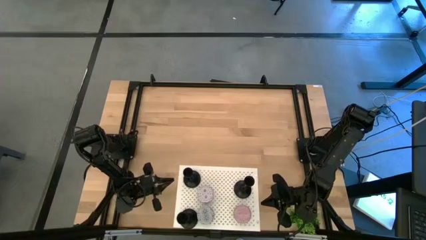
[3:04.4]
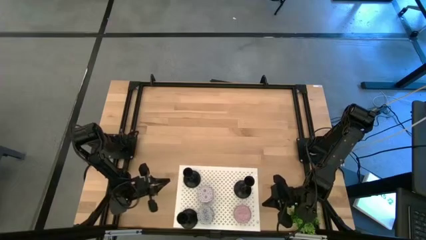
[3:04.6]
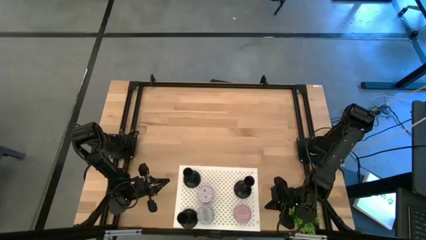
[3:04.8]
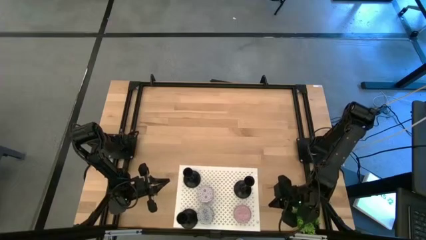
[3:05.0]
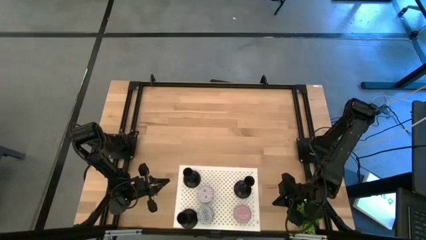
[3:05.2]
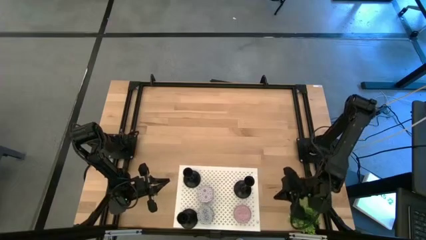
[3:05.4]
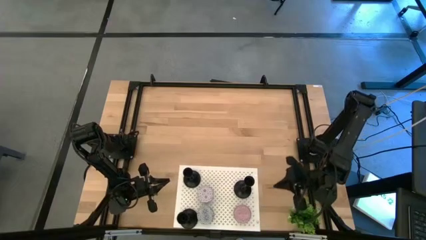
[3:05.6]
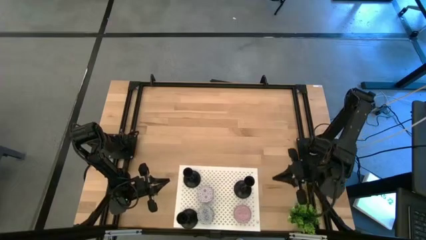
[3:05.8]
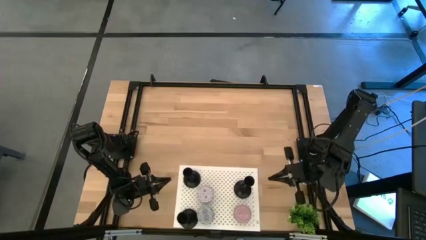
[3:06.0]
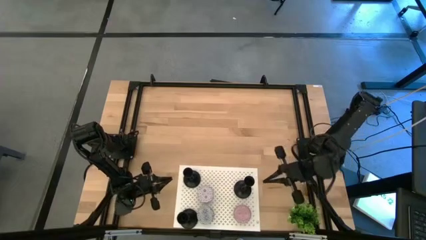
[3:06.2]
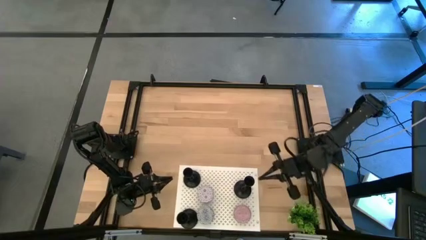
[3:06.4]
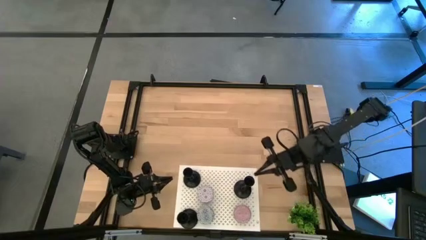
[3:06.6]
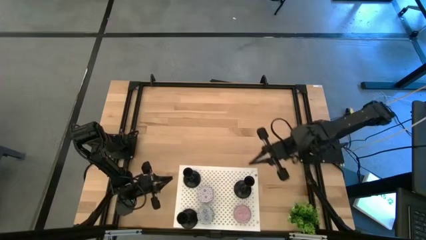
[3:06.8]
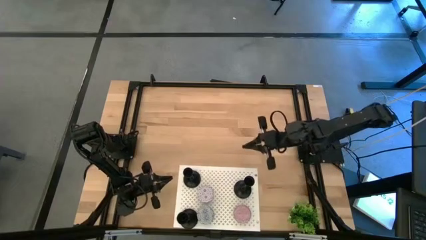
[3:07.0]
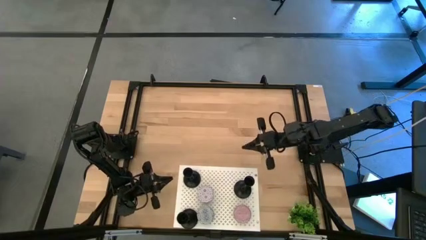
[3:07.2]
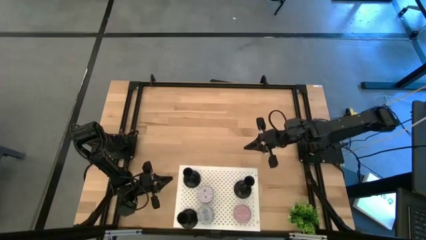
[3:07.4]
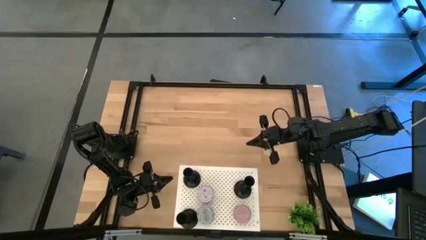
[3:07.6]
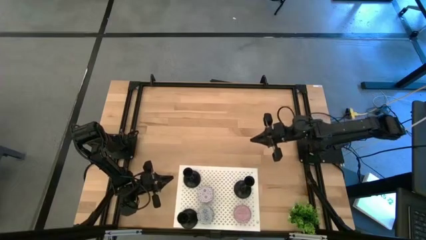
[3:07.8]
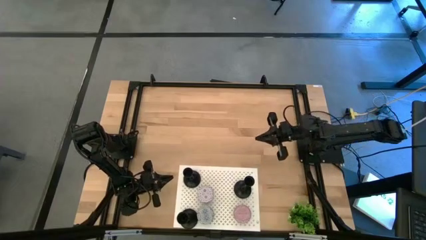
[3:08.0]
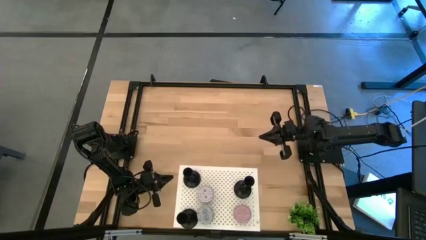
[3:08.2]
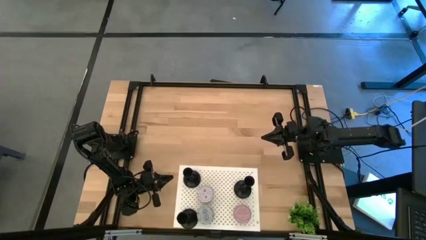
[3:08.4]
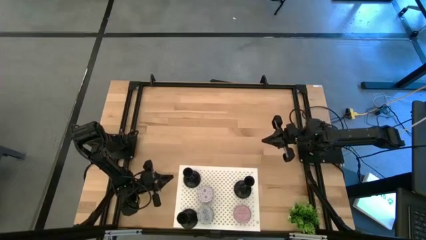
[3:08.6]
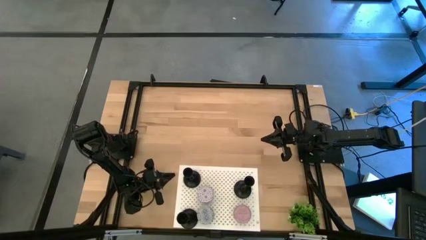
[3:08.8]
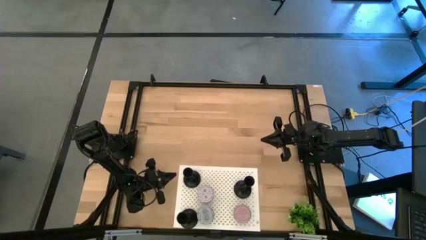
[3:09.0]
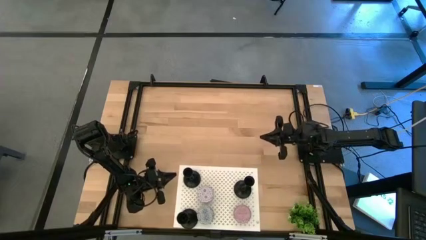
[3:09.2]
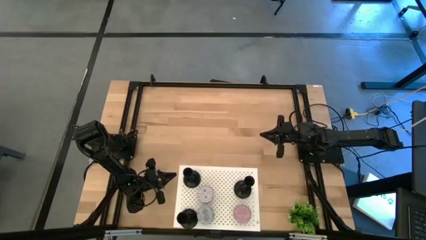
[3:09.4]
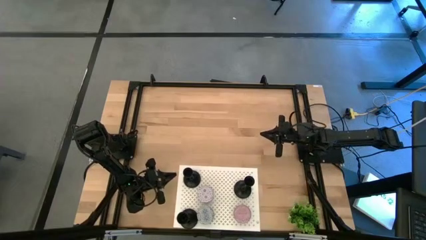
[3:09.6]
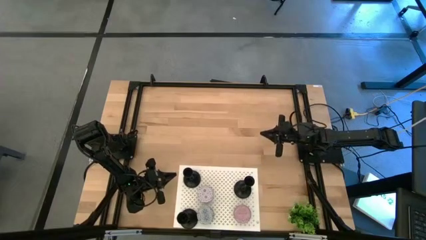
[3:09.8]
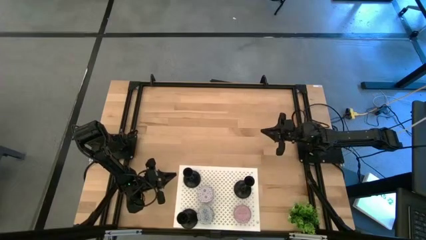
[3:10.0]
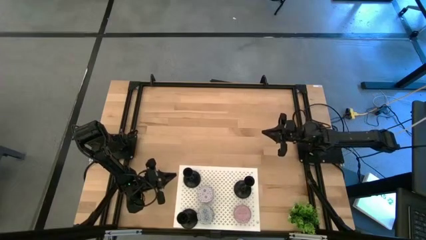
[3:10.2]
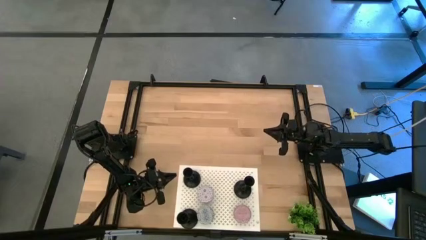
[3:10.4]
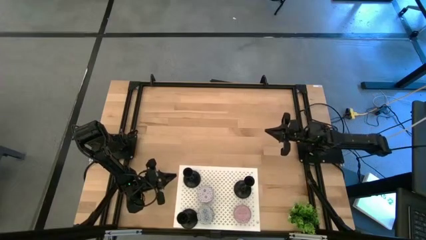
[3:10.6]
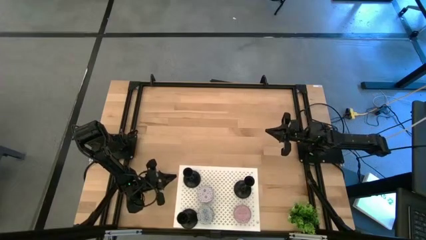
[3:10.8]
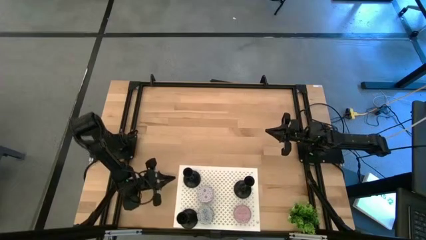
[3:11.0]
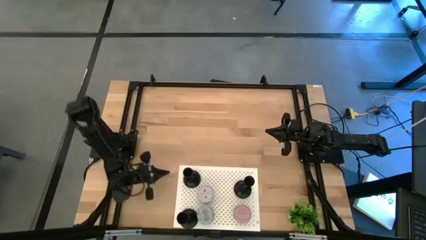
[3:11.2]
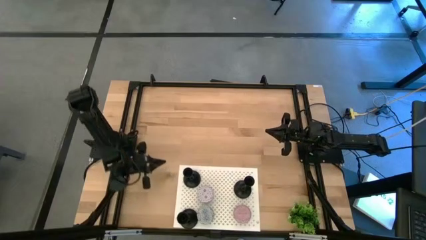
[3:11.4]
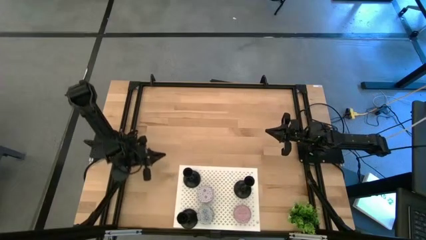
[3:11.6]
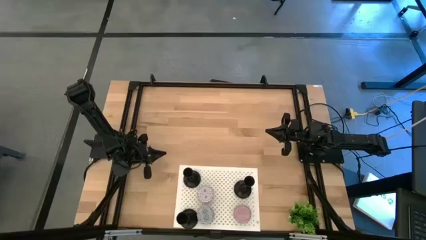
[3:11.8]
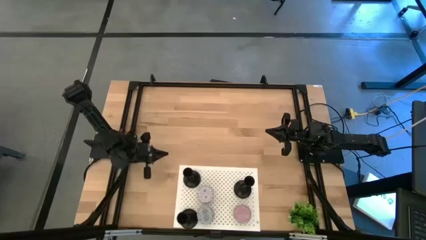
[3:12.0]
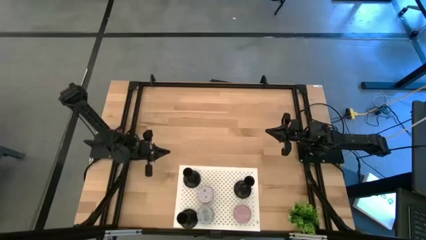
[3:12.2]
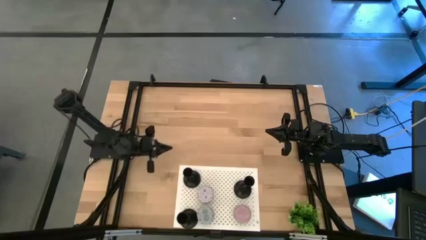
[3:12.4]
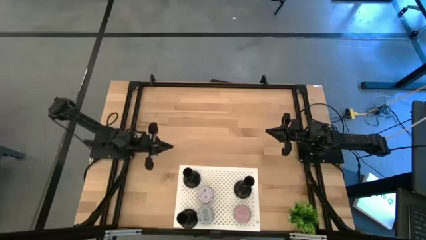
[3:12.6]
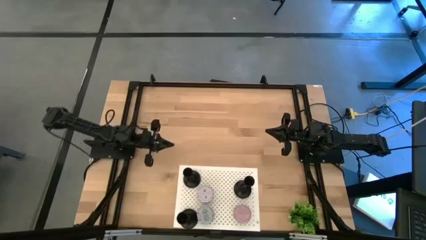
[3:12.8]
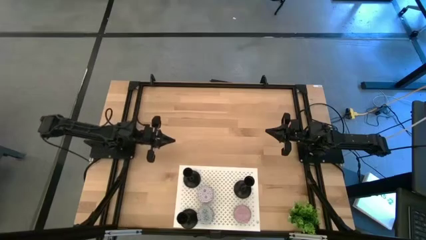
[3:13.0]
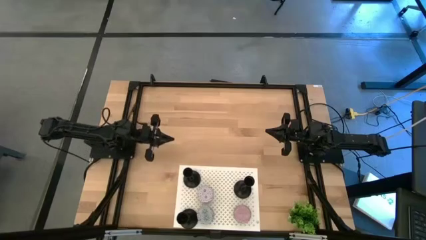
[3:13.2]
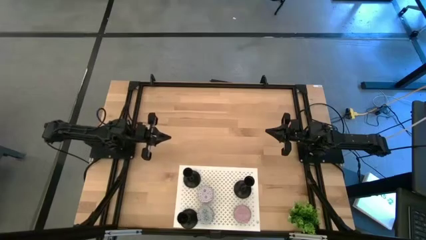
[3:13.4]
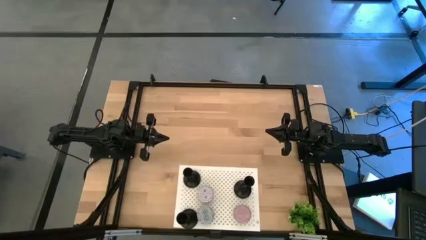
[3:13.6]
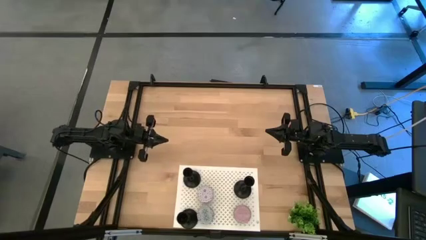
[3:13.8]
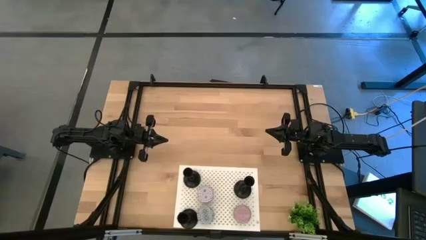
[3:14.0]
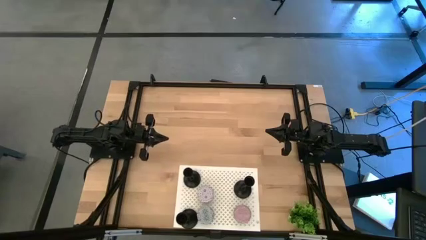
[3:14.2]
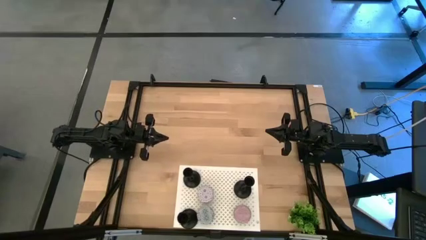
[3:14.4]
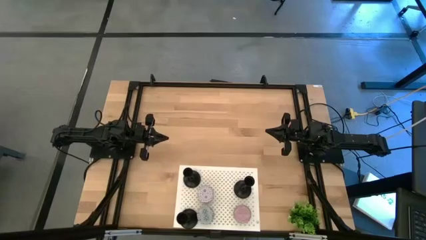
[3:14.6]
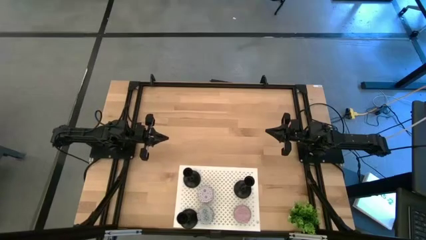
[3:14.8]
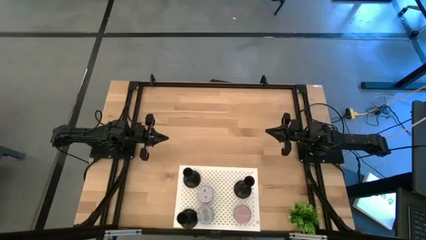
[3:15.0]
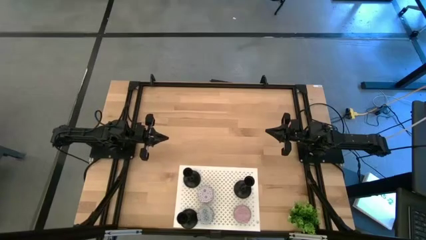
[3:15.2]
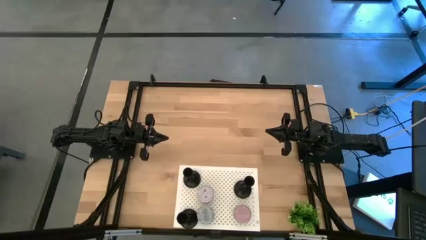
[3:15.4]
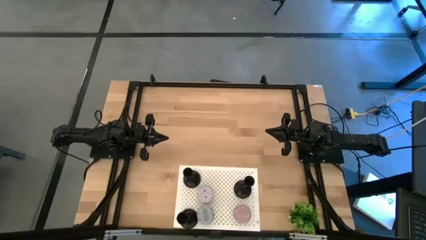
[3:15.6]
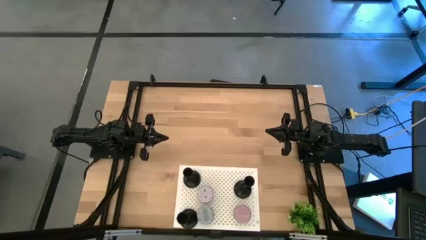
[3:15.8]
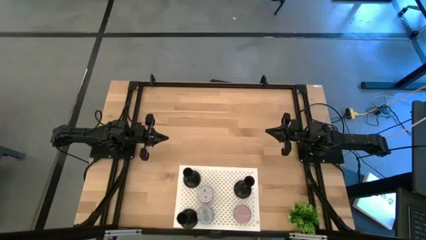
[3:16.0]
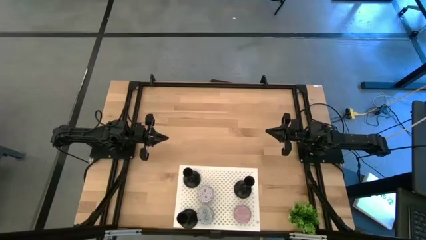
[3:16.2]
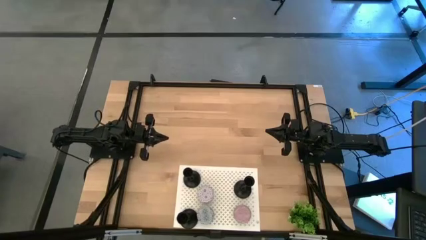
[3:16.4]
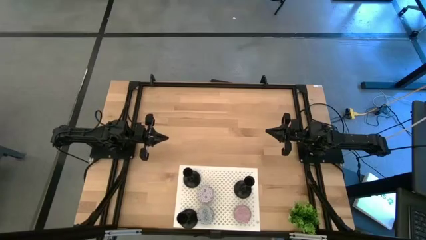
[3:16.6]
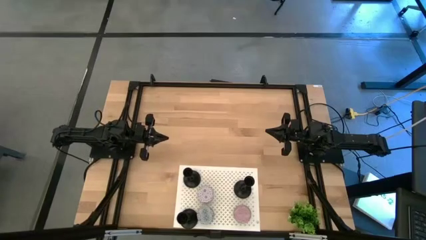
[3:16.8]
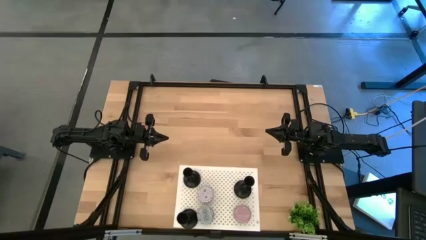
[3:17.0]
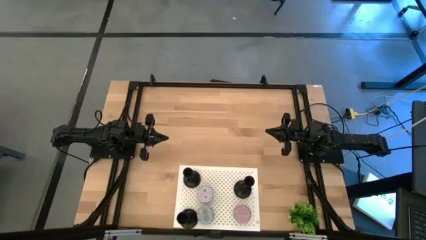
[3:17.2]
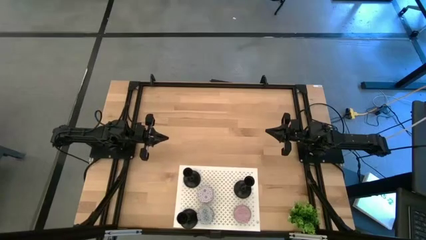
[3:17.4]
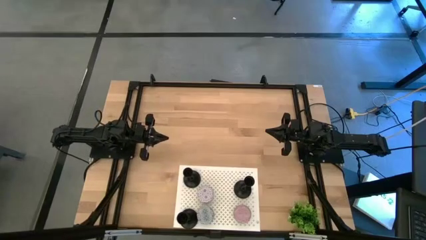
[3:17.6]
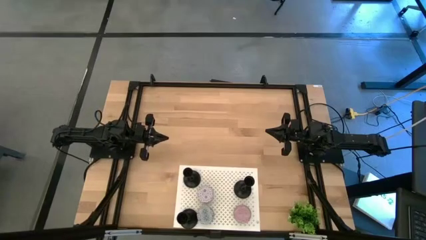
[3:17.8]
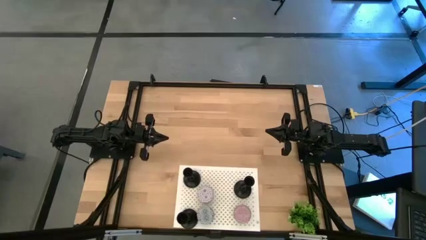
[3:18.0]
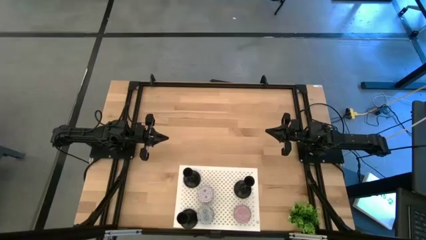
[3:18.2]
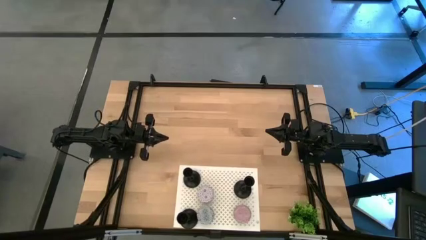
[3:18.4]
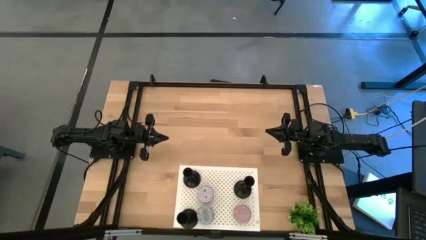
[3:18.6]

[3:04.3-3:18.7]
Task: Pick & Place candle stick holders
Return to Home Position

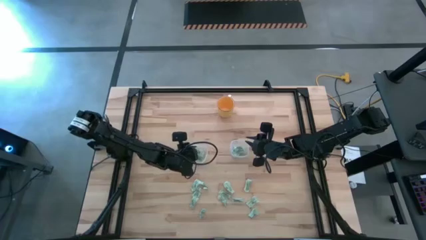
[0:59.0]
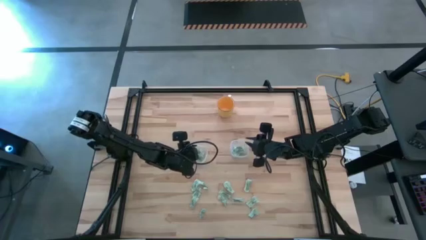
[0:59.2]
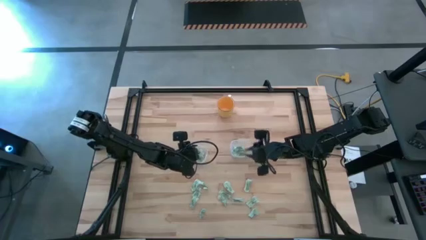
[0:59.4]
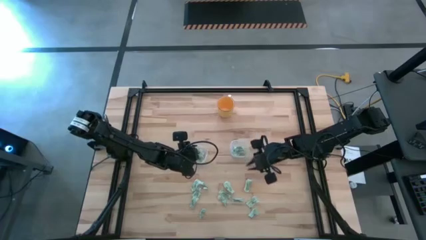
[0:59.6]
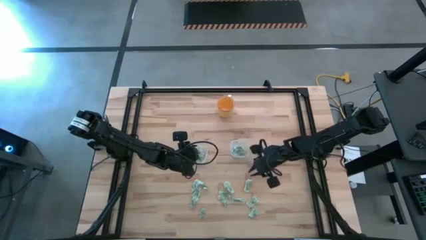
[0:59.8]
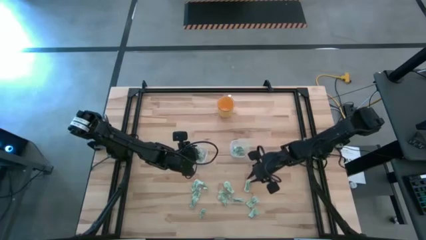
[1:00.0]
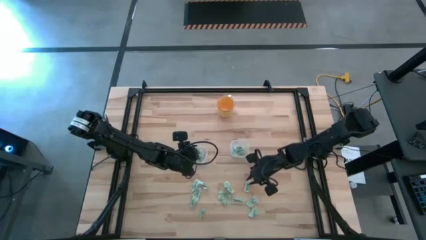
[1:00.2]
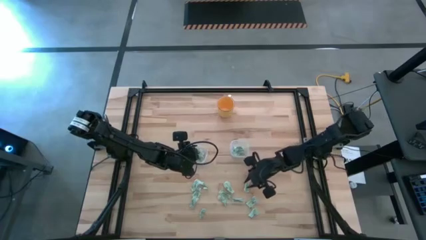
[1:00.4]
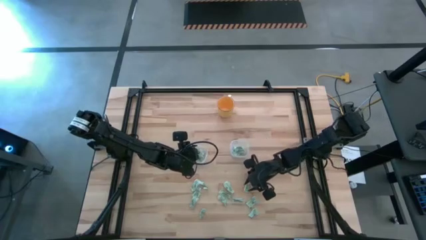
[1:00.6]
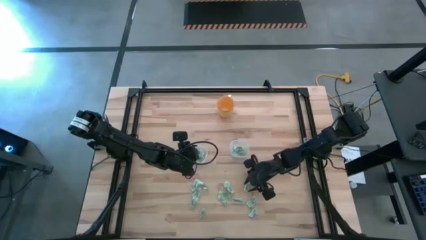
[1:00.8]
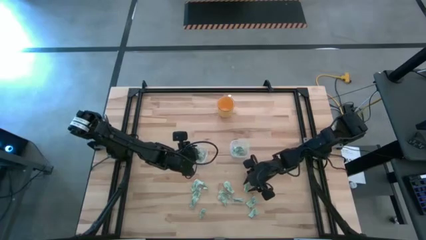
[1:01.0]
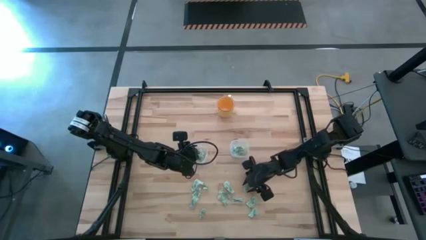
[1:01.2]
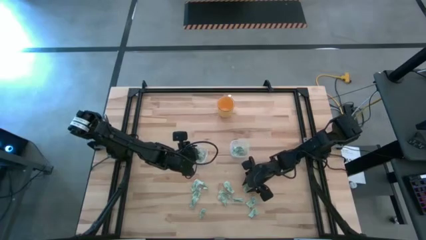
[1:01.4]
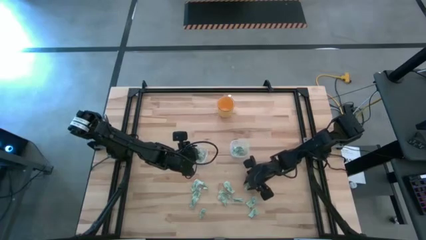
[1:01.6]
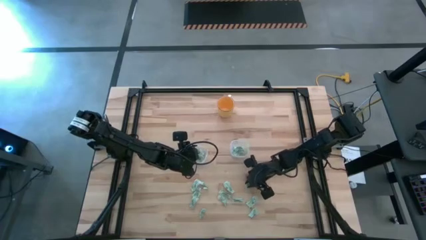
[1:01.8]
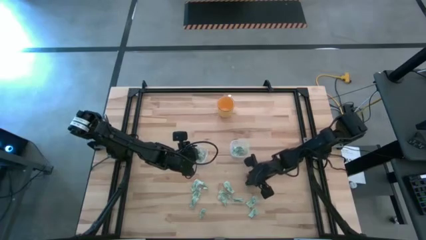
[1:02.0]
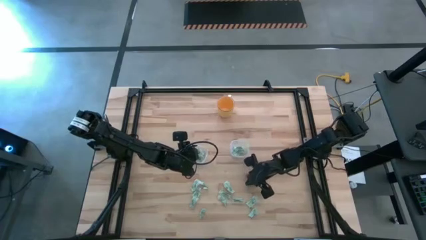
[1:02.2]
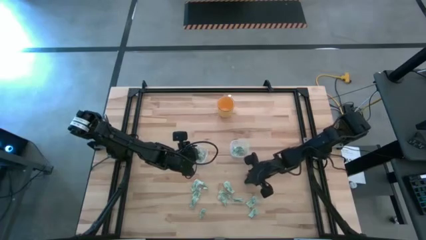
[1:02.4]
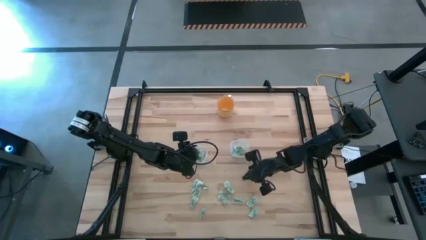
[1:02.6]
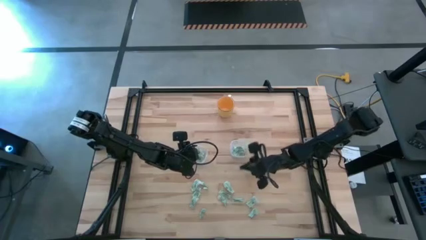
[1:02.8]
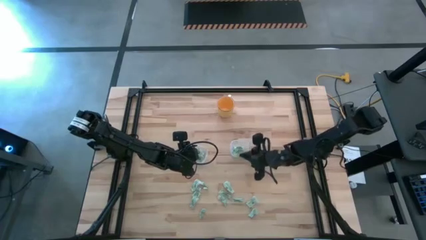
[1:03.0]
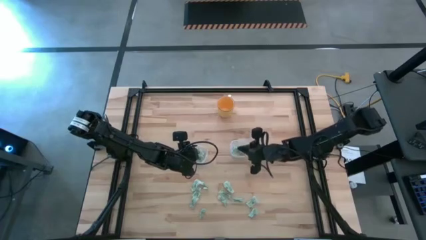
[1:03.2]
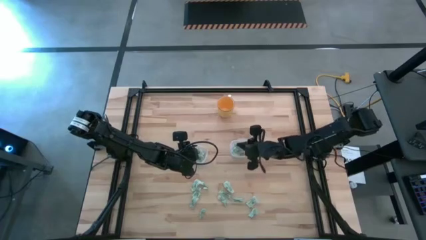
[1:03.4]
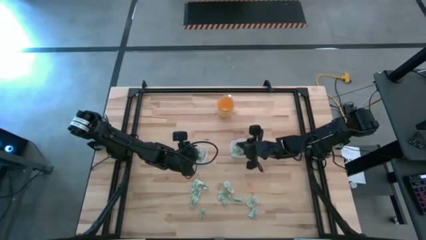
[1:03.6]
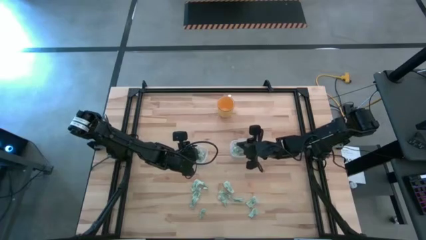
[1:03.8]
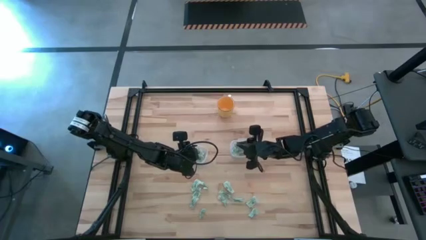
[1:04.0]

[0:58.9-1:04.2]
Task: Pick and place items into bin
Put the green sweetener bag into the right transparent food container
